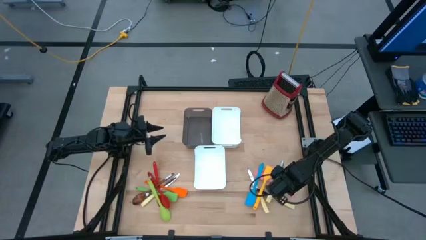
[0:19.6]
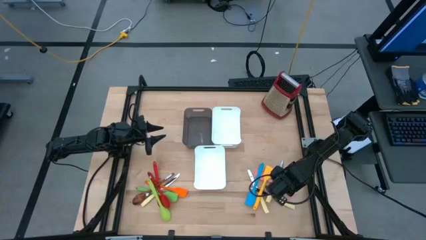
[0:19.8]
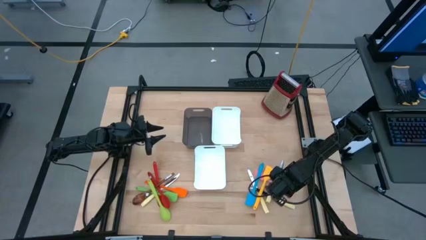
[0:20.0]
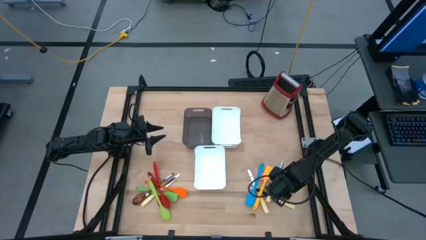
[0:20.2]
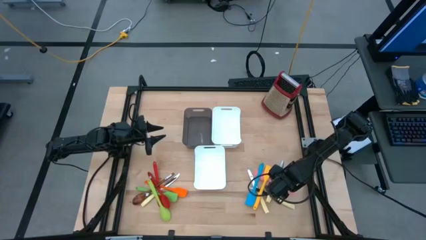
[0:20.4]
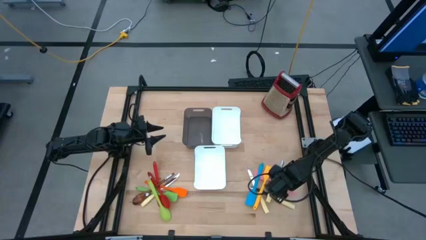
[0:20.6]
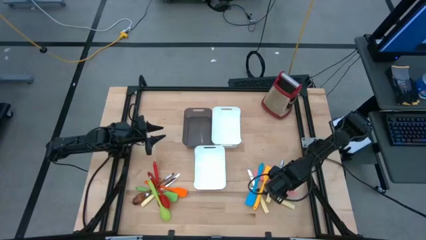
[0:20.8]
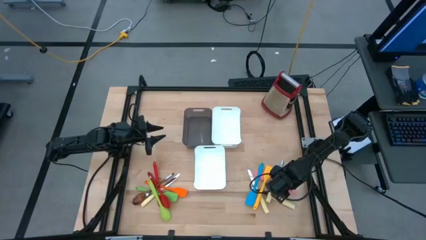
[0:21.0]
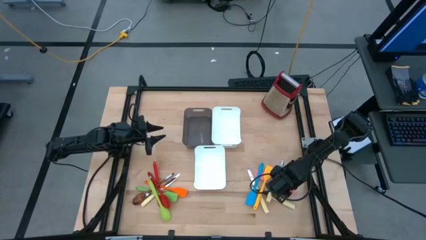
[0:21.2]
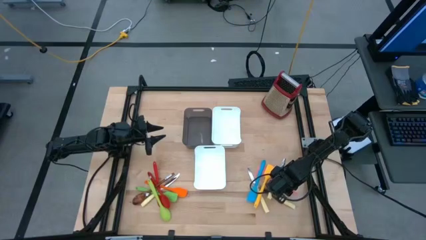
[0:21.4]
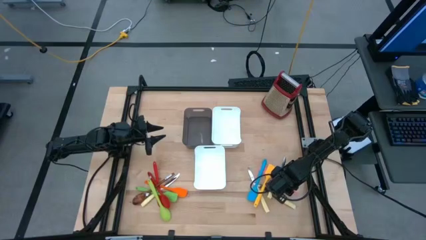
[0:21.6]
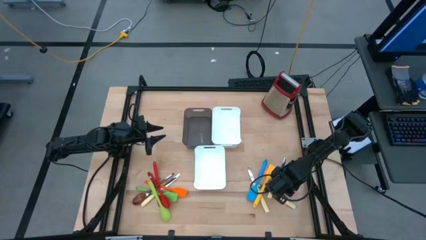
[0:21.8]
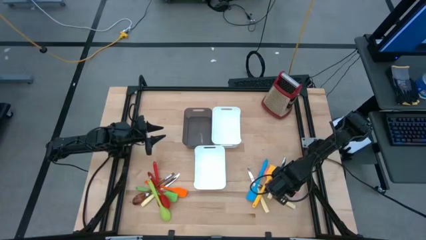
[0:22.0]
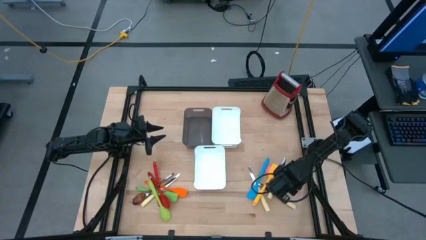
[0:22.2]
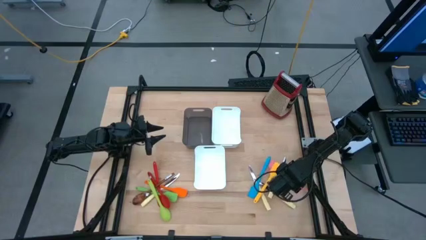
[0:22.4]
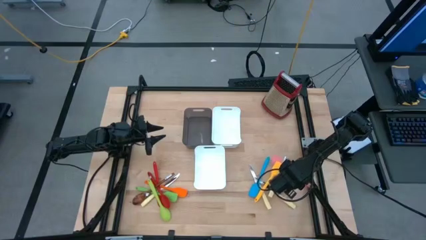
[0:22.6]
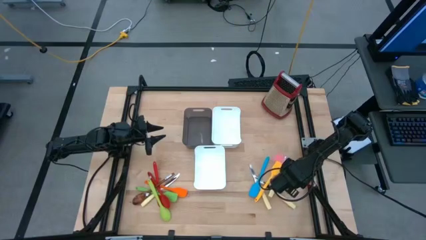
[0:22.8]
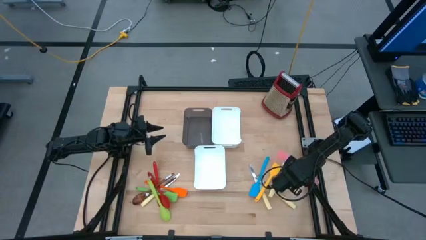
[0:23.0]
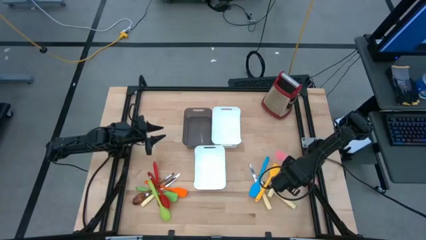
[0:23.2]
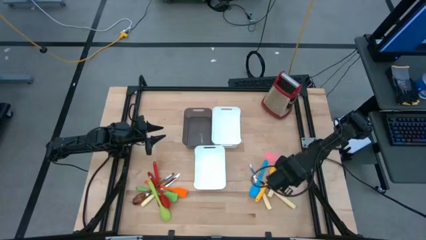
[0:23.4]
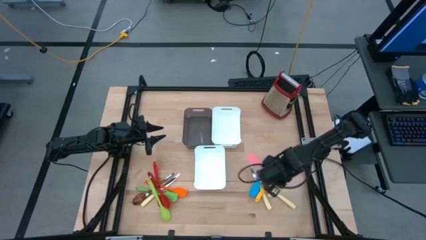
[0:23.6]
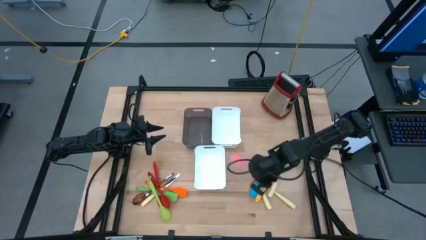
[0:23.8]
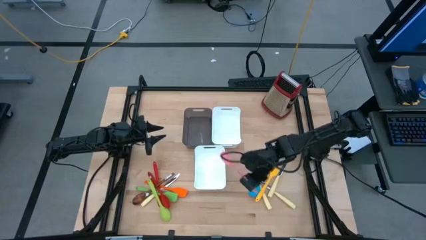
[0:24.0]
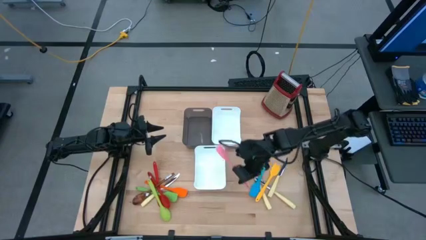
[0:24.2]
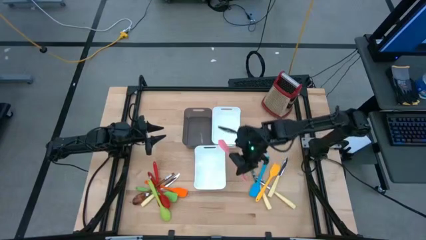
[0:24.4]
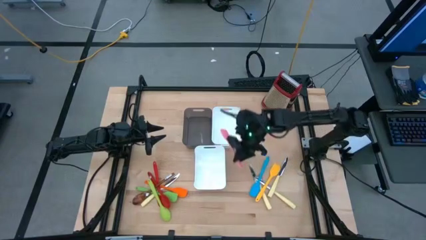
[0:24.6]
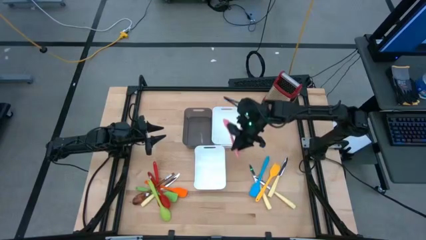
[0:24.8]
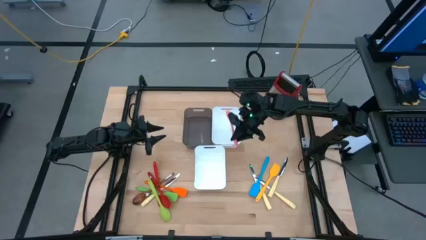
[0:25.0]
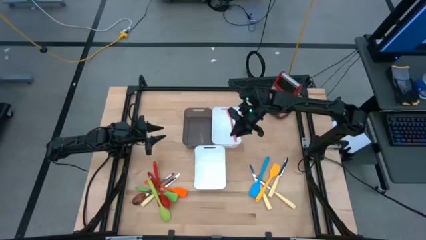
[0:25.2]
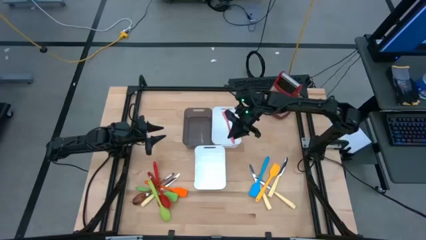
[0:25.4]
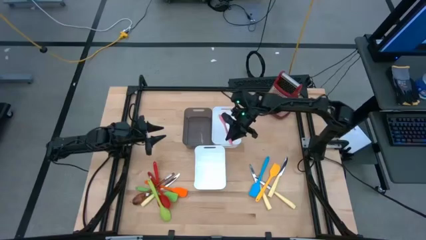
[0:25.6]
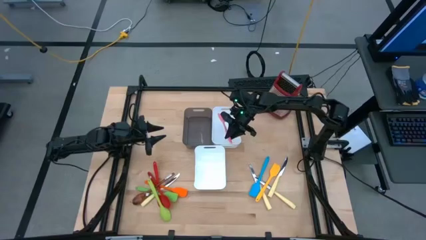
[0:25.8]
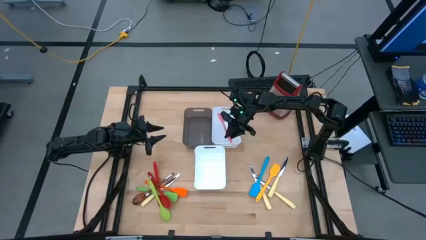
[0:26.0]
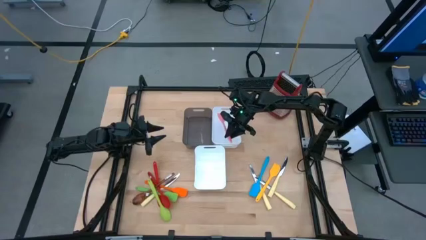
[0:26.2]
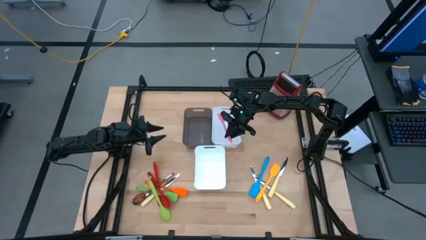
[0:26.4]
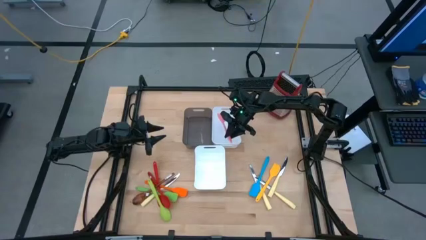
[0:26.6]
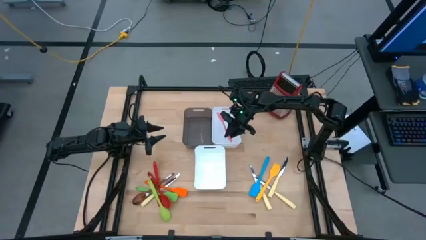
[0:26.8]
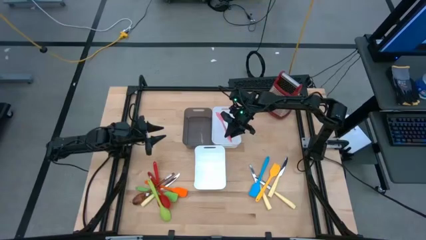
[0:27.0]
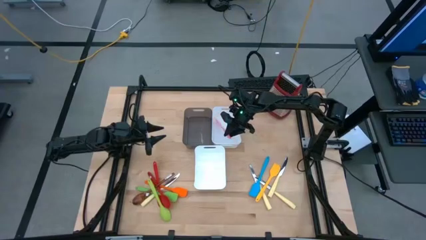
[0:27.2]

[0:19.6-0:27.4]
Task: Pick & Place Kitchen Items
Put the pink spatula into the top white bin

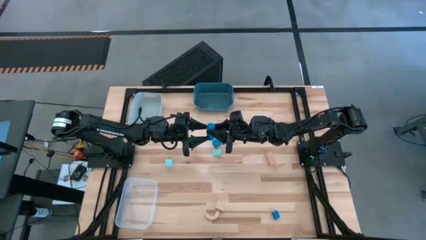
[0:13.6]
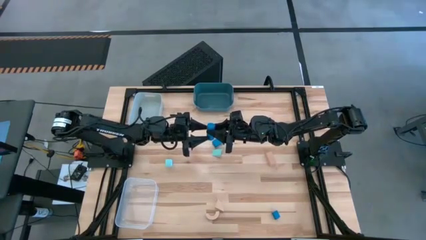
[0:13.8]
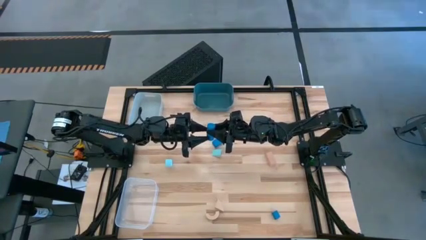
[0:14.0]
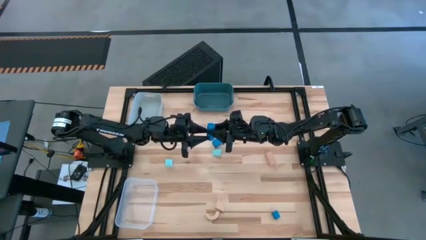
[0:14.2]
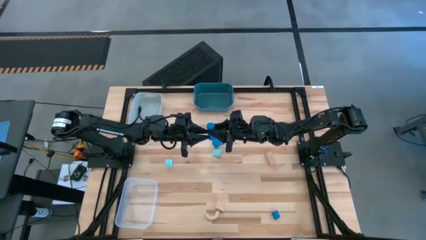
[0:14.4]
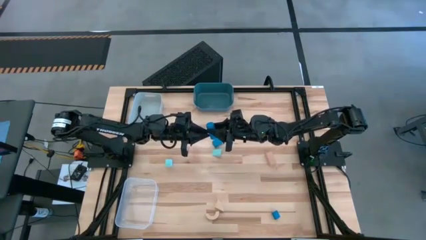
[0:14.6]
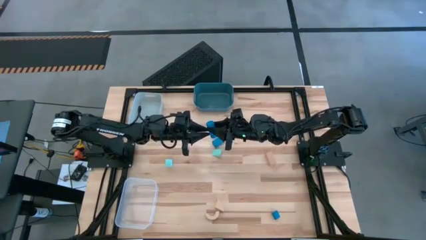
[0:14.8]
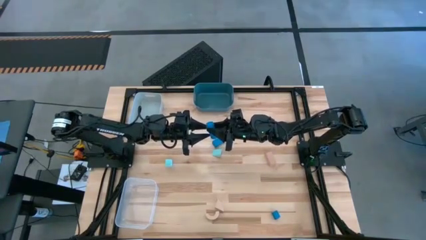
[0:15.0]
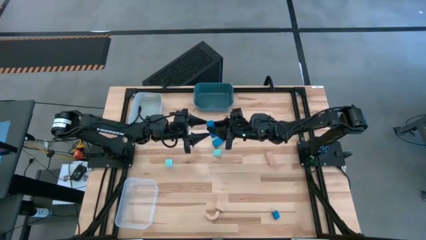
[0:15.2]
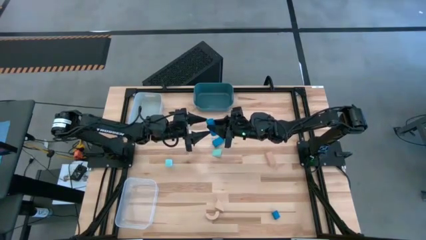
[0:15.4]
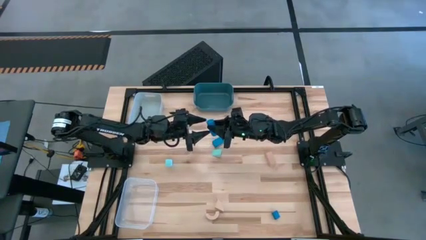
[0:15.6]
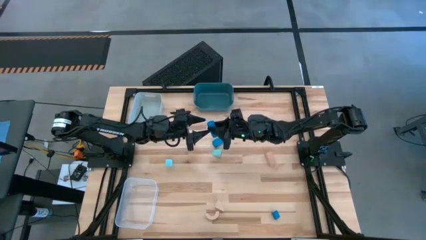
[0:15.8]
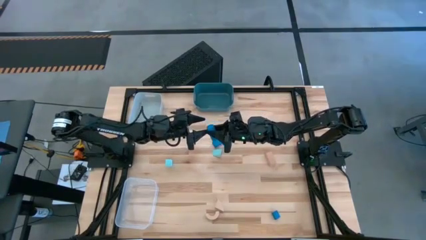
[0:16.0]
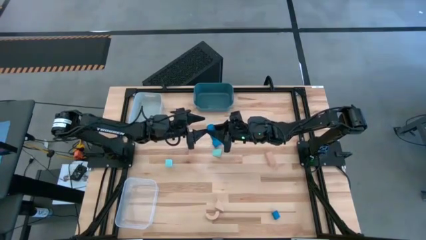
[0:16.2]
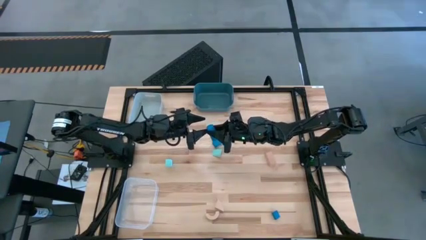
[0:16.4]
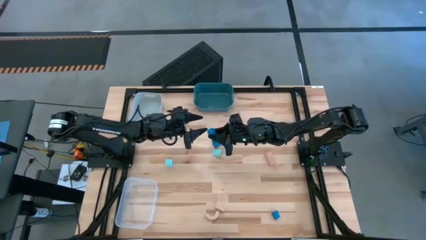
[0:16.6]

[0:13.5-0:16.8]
Task: Sort & place blocks by color
Put the top blue block into the gray bin

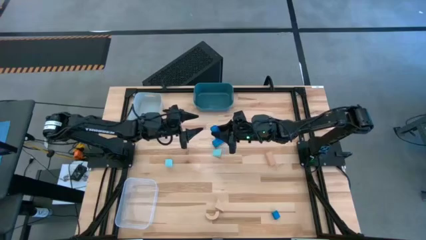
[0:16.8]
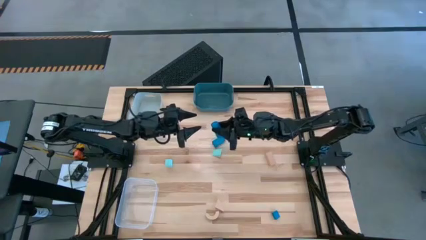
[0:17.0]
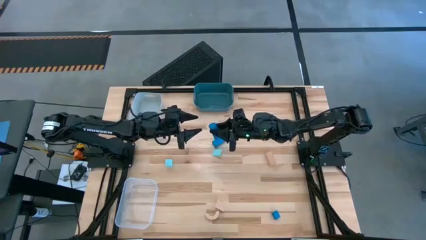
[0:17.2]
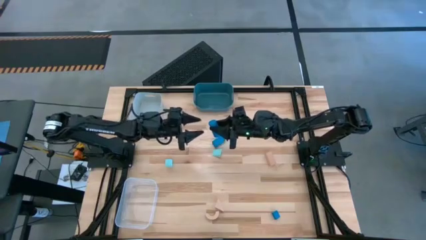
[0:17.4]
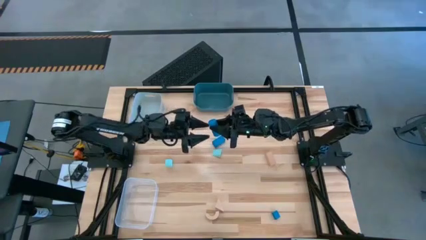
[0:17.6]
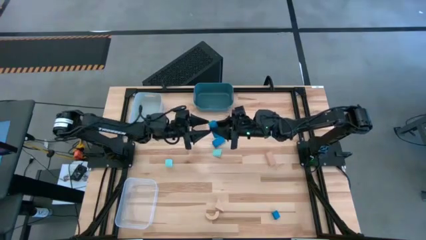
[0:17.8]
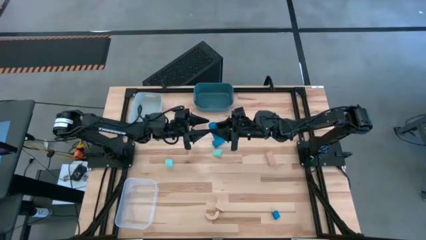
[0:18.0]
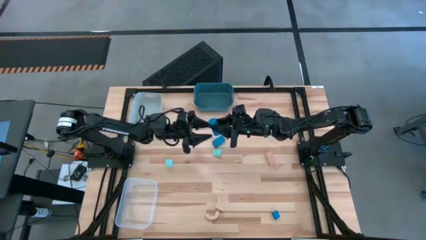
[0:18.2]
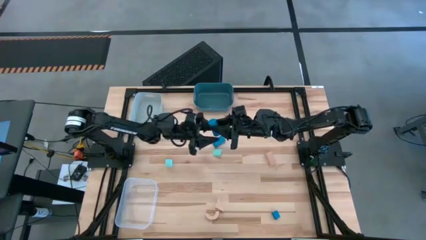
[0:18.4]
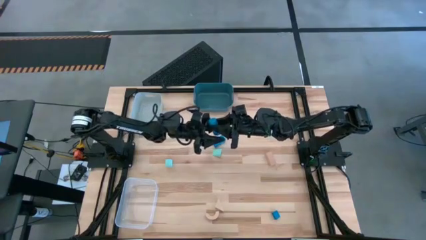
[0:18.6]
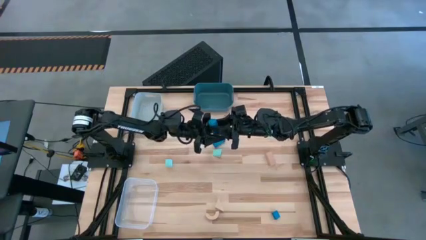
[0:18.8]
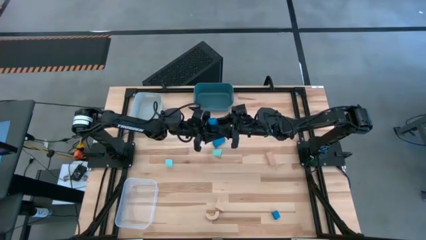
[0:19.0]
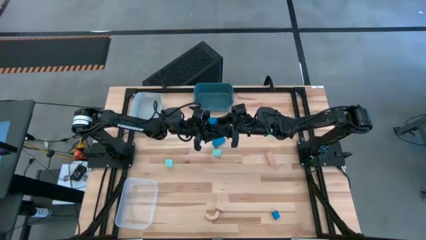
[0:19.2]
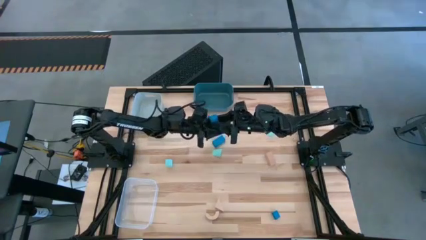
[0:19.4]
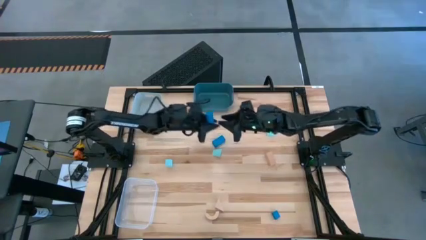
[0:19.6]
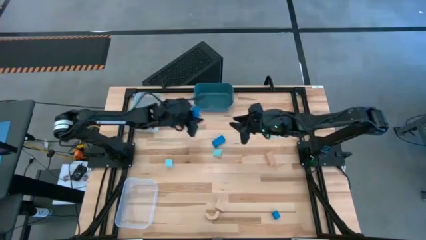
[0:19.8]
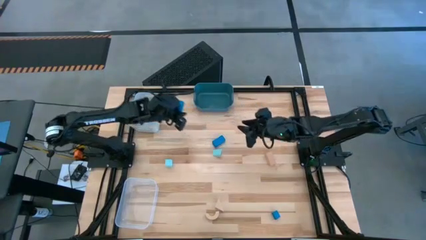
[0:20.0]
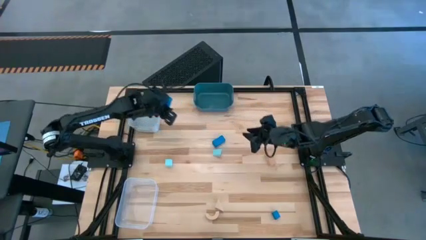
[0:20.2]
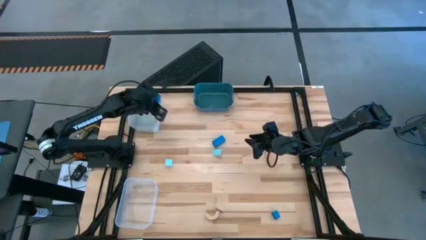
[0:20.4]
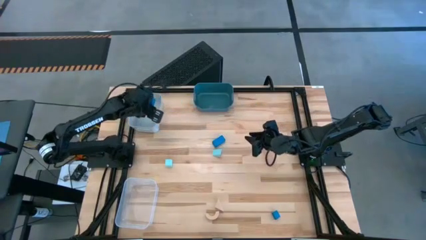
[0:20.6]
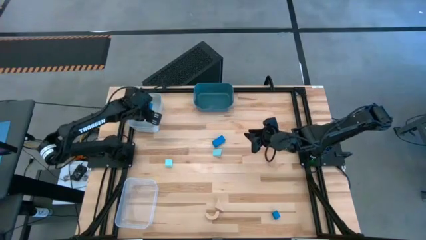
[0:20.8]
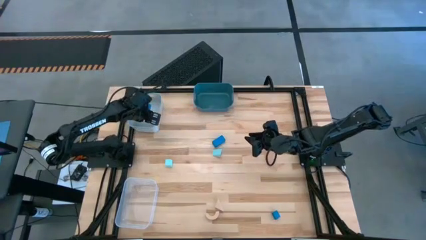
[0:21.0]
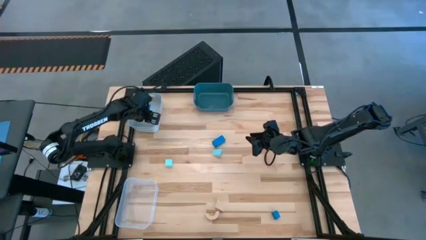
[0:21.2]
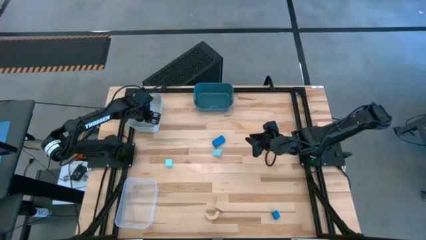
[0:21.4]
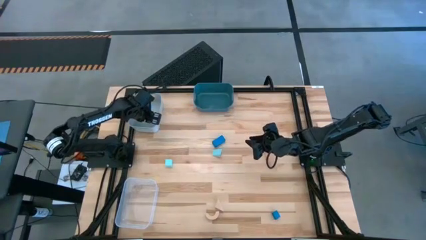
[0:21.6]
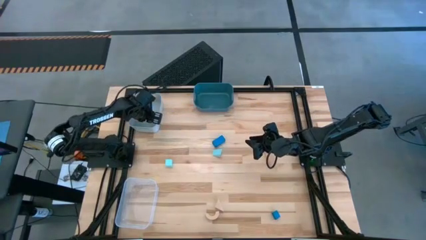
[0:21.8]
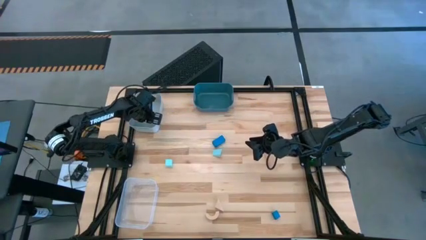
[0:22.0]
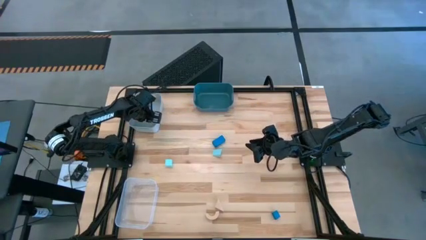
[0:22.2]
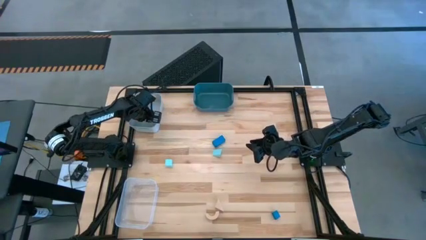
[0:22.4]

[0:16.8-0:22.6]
Put the top blue block into the gray bin
